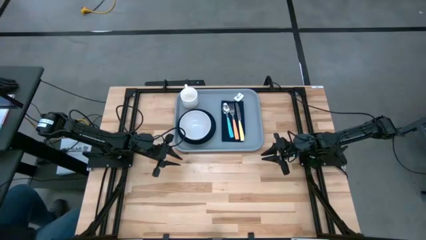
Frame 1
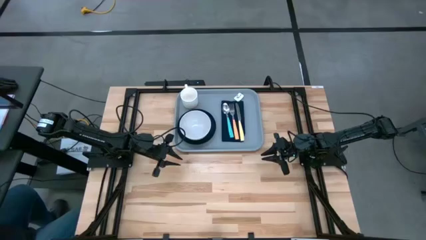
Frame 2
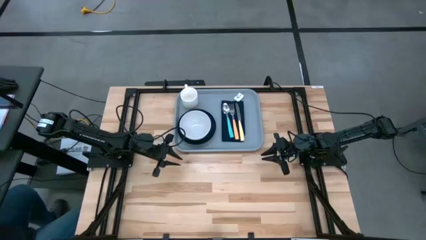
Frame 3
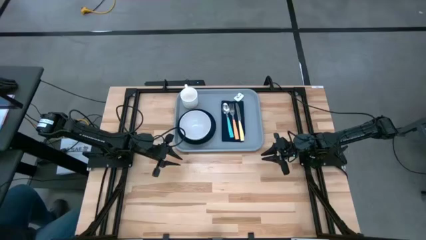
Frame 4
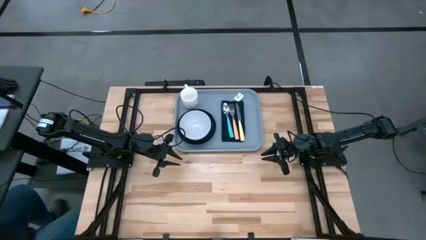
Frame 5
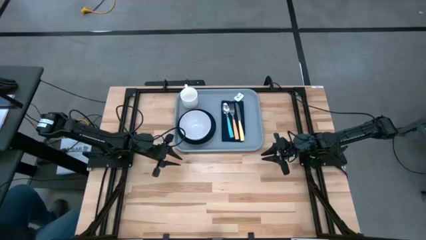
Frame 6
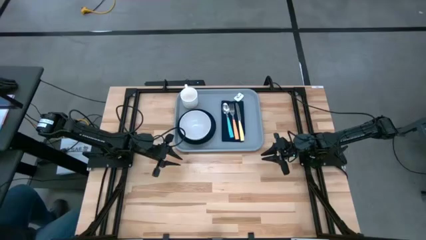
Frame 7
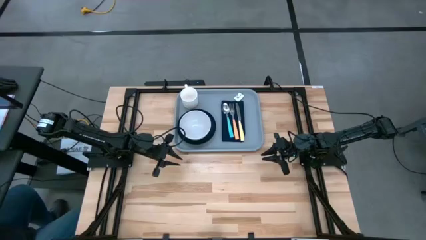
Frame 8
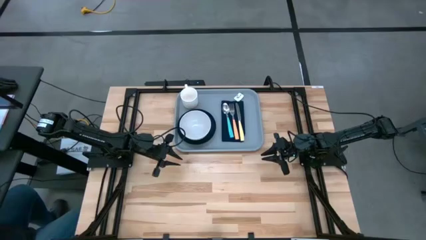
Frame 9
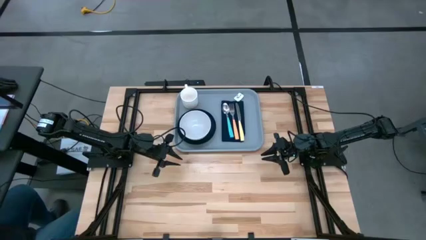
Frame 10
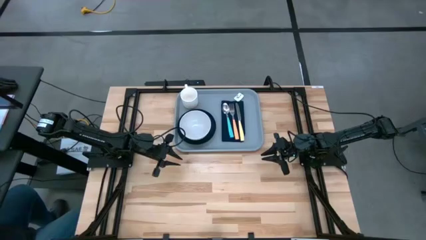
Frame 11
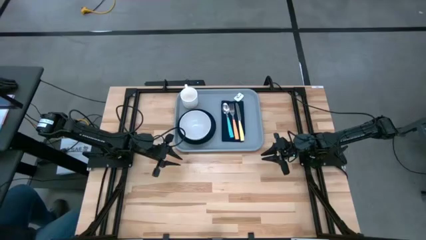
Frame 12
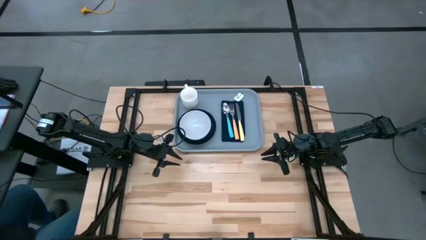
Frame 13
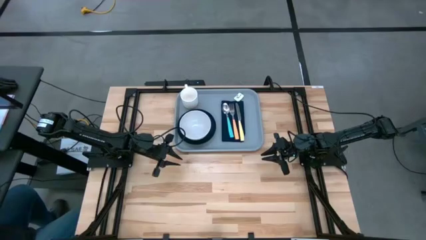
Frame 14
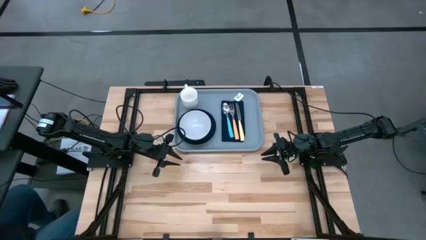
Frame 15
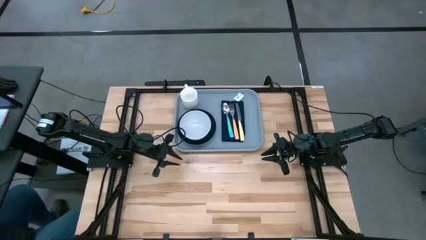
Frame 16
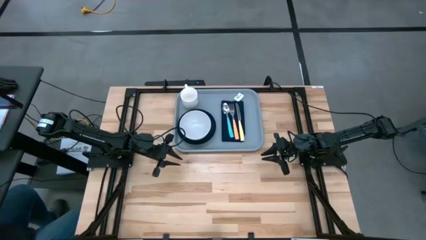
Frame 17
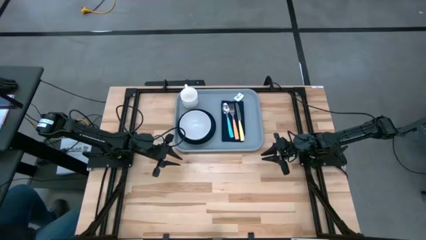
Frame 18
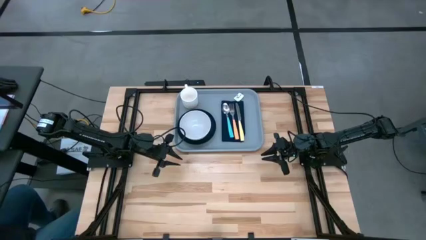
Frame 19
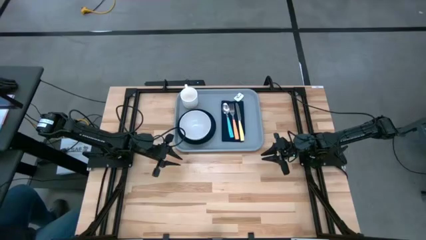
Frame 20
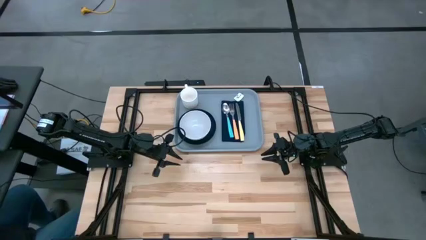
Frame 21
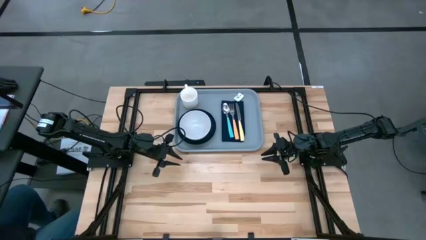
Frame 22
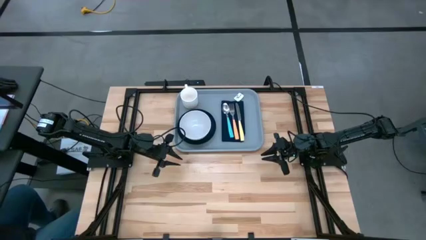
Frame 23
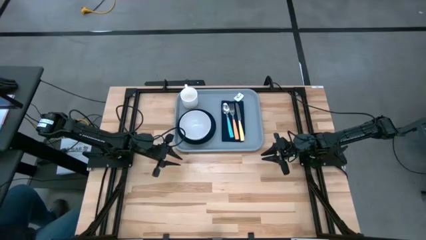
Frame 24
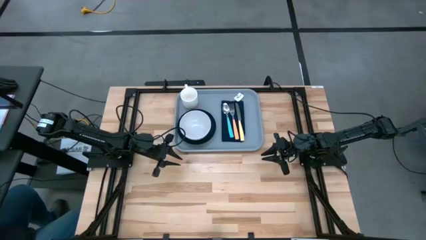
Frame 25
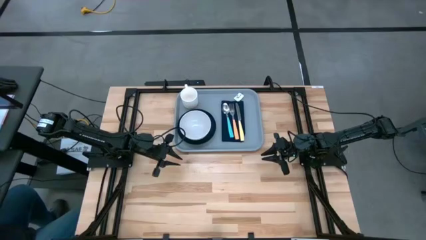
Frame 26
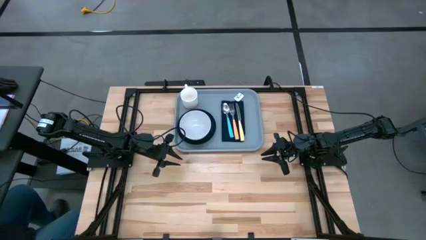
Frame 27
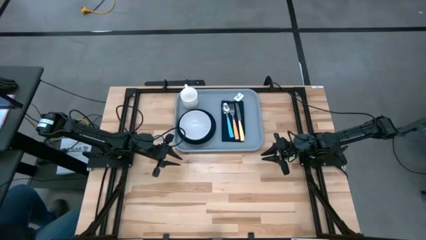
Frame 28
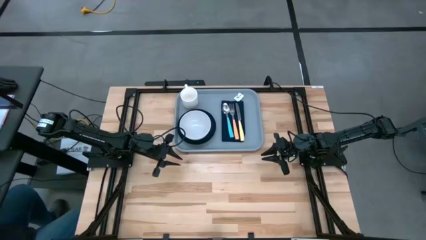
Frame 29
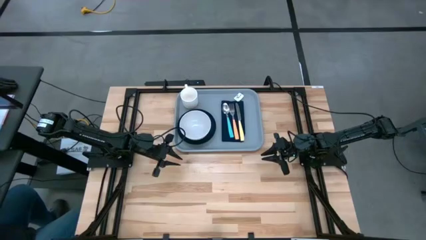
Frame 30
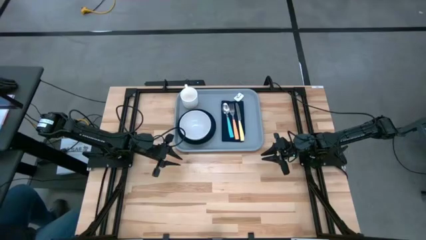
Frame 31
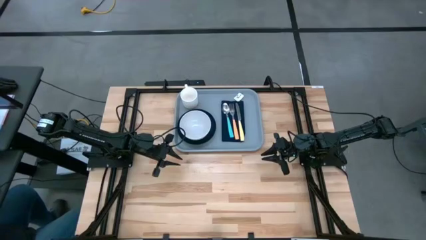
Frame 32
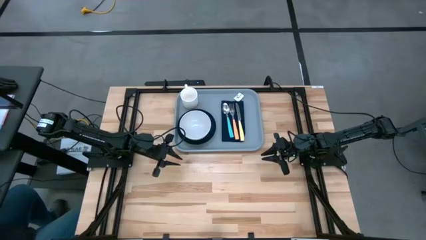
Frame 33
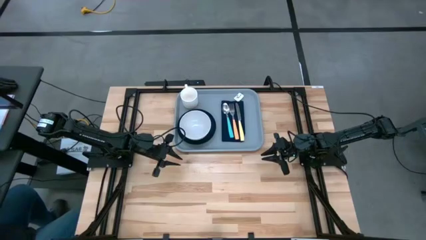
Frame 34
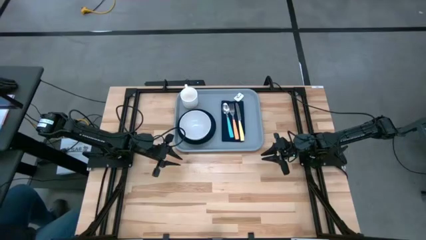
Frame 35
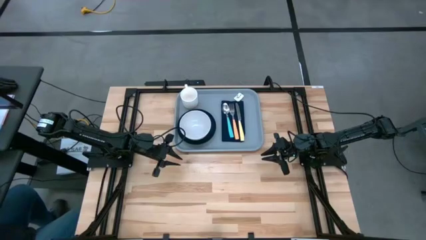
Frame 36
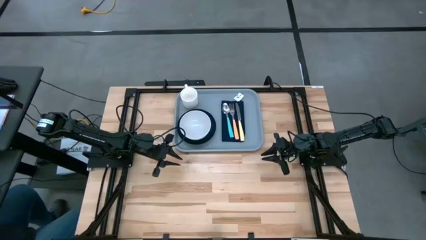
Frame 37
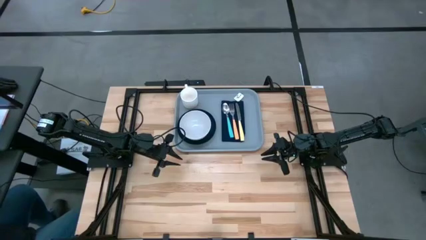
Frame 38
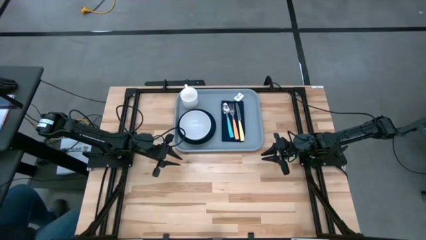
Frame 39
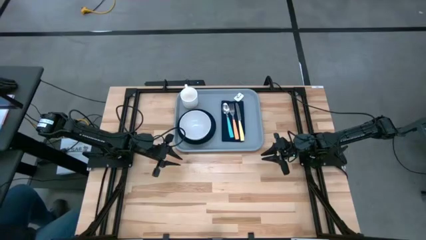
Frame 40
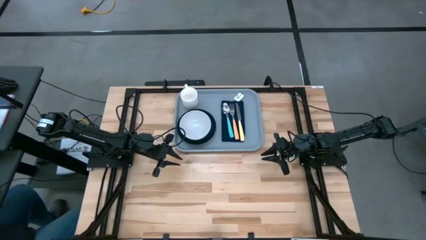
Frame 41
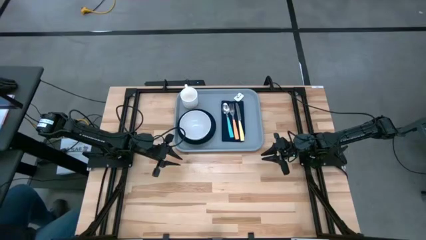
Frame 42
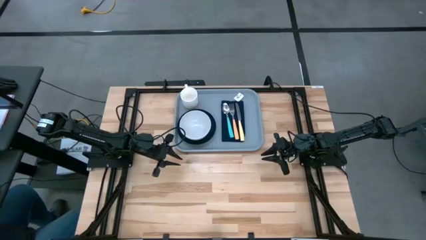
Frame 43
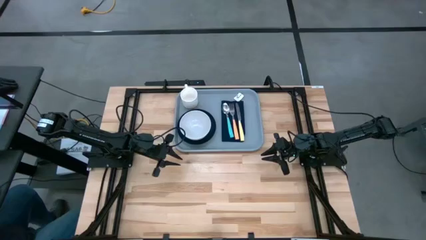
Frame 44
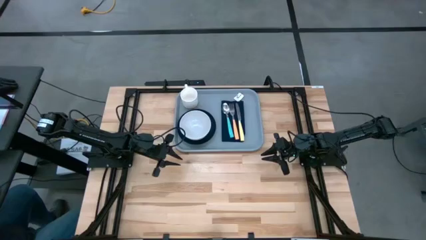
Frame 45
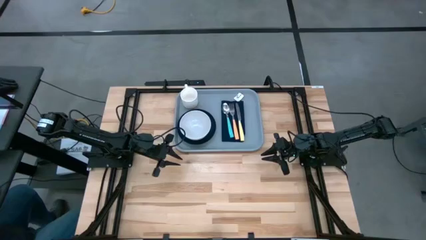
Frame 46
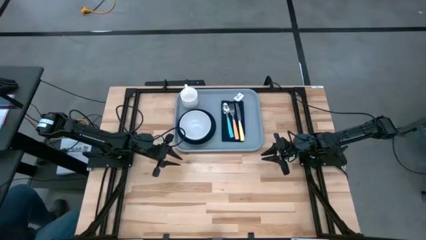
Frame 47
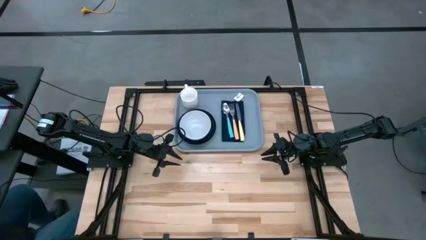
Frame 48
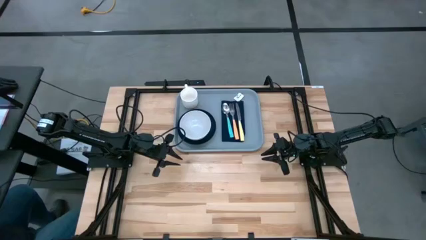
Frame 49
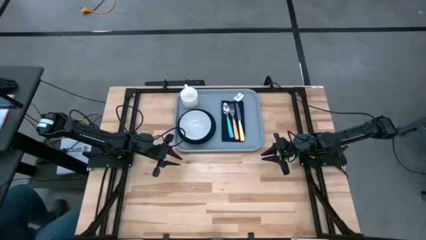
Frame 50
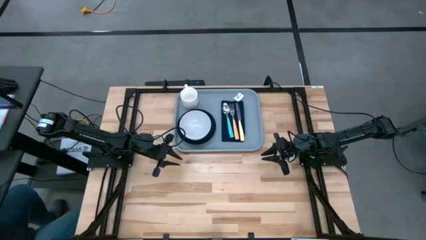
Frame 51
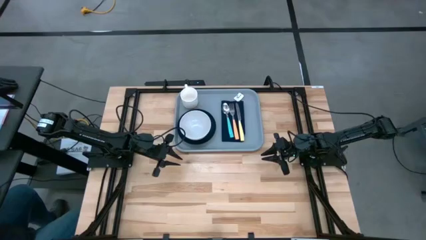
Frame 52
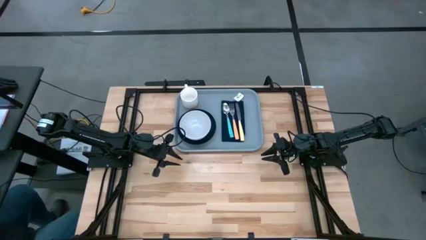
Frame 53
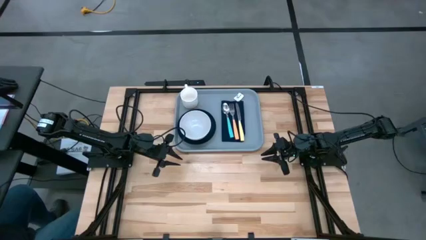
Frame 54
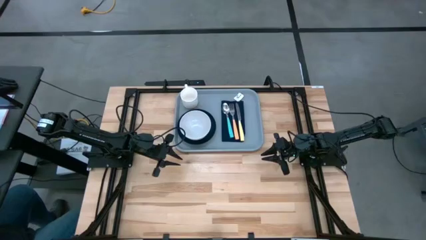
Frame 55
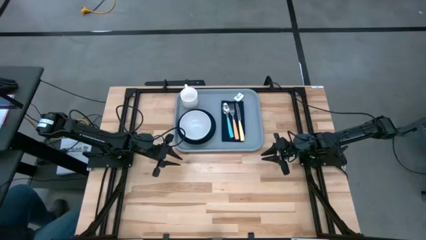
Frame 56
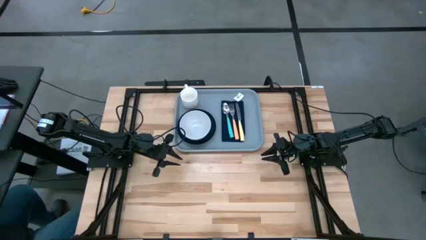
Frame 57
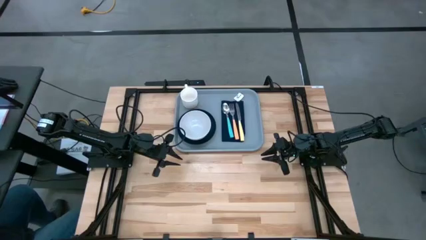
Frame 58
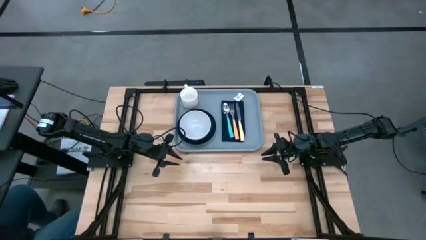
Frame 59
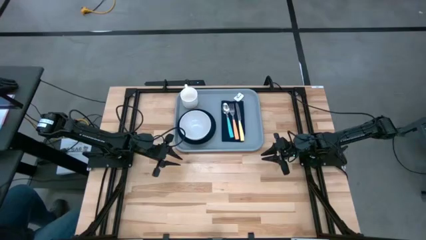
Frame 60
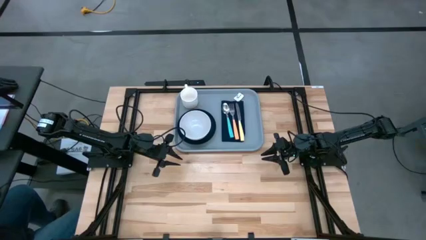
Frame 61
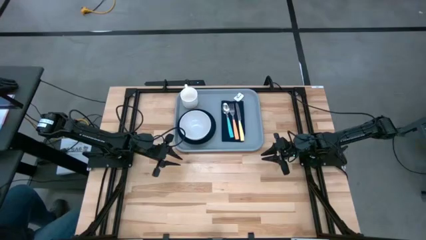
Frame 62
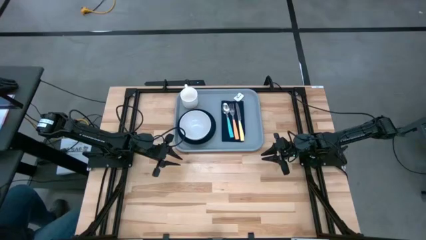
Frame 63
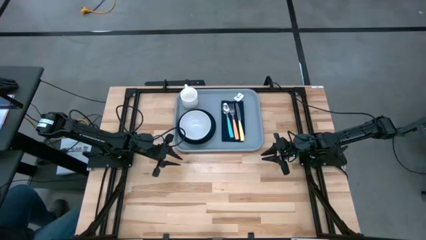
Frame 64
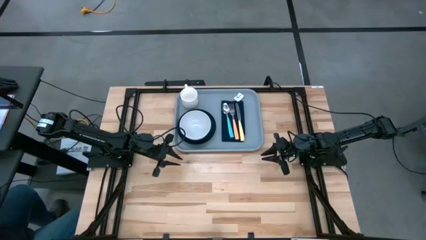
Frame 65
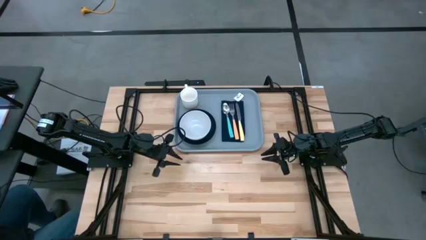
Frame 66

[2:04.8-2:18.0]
Task: Set up tray
Return to Home Position

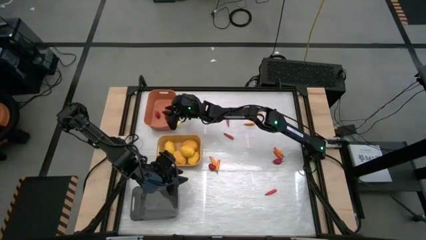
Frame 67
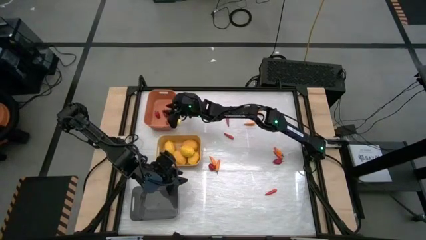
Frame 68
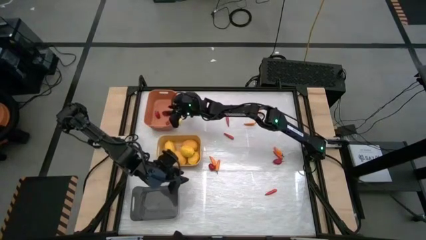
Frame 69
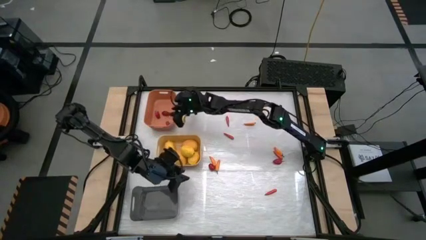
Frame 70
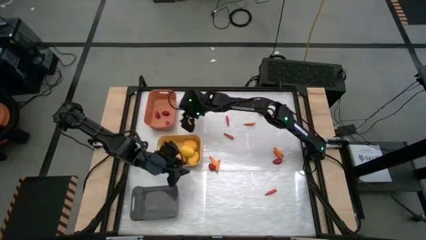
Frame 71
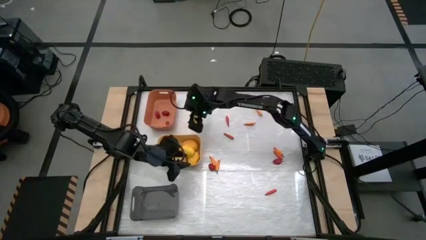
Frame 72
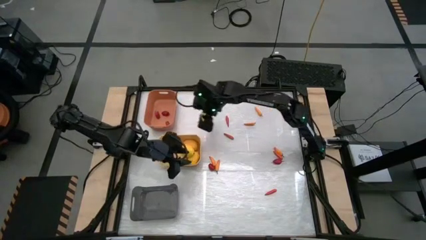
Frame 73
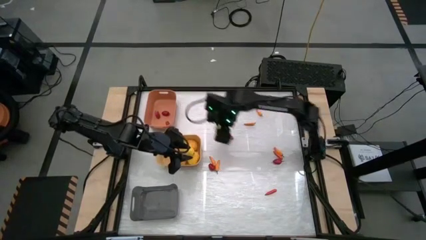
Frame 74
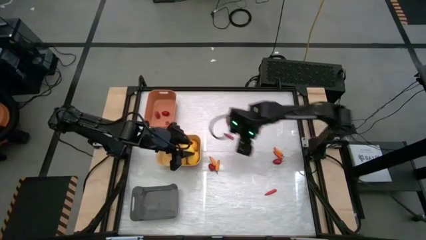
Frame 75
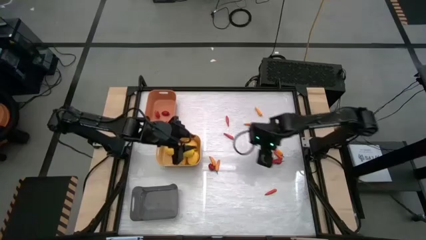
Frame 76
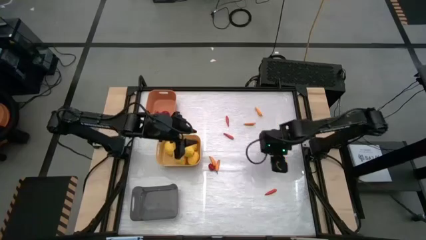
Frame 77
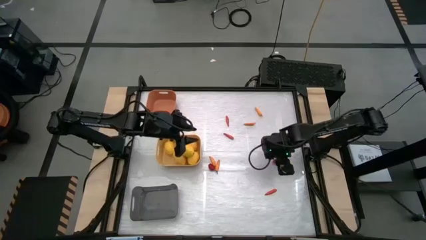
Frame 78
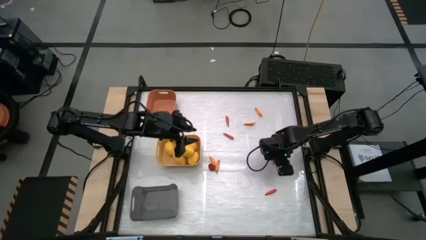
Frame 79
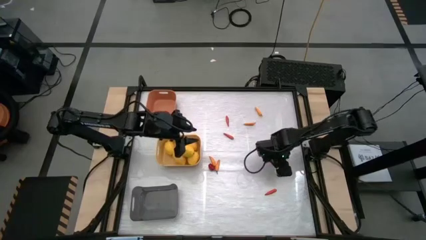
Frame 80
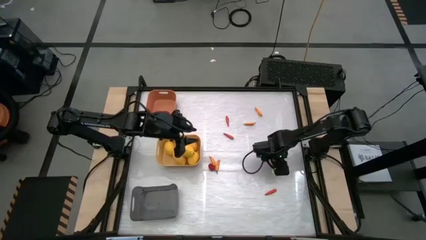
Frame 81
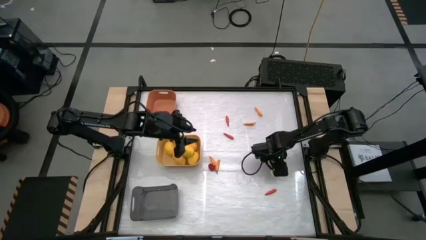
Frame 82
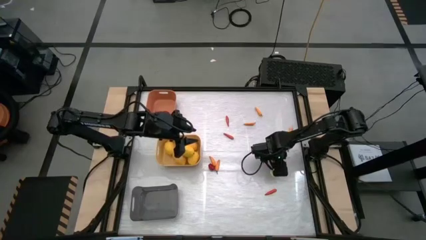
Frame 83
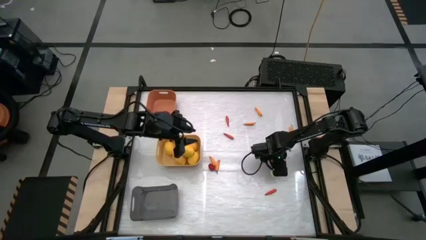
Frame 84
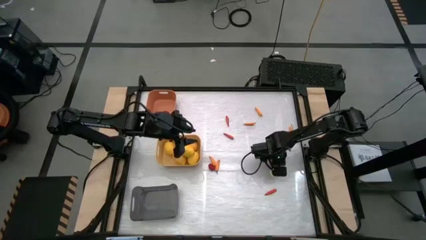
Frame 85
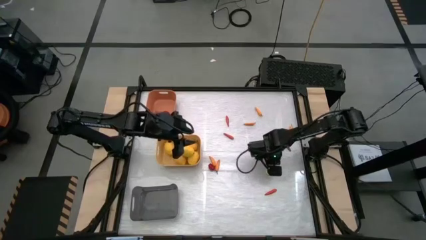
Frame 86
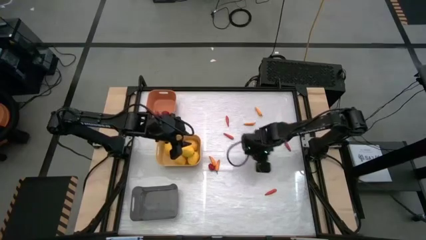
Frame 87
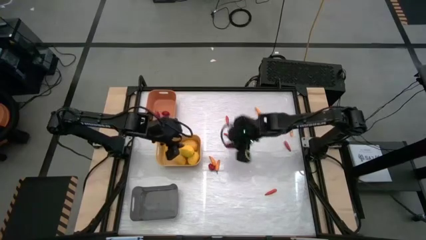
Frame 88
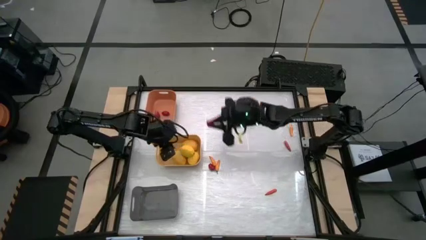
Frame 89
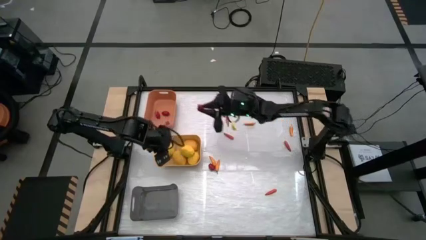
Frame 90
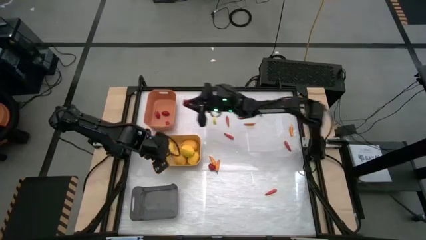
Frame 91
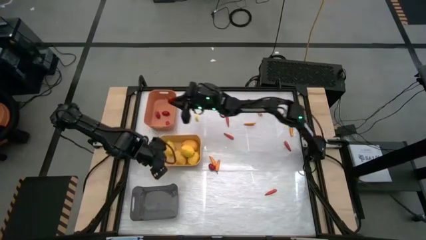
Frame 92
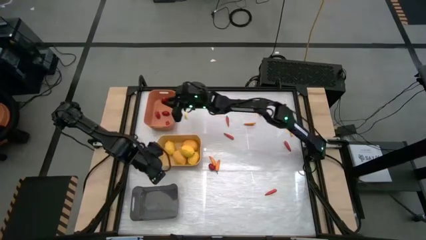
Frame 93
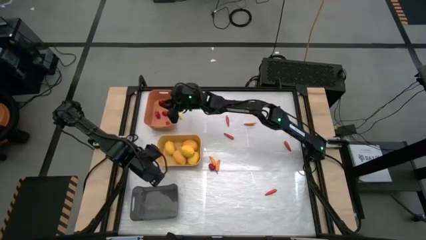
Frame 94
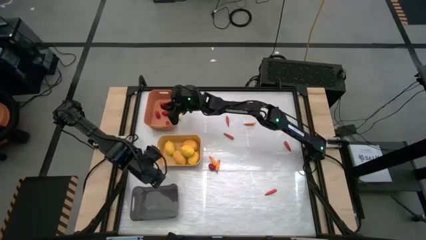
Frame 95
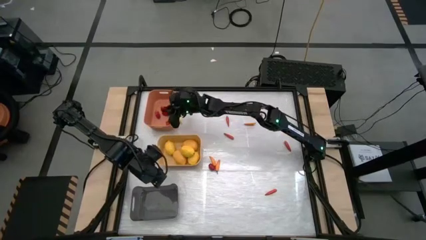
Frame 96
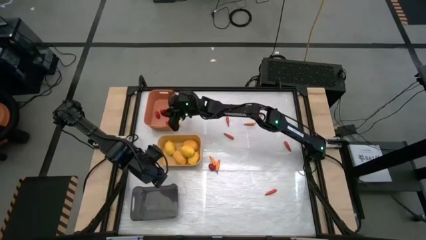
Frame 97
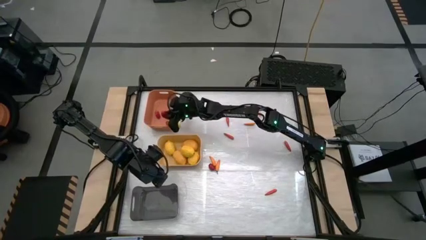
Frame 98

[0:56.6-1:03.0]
Task: Sort produce into baskets
Put the red chili pepper into the orange bin
